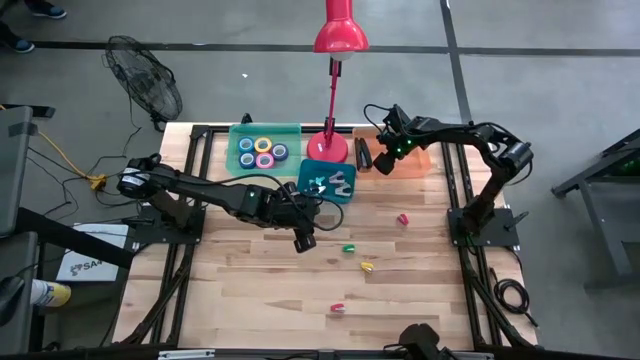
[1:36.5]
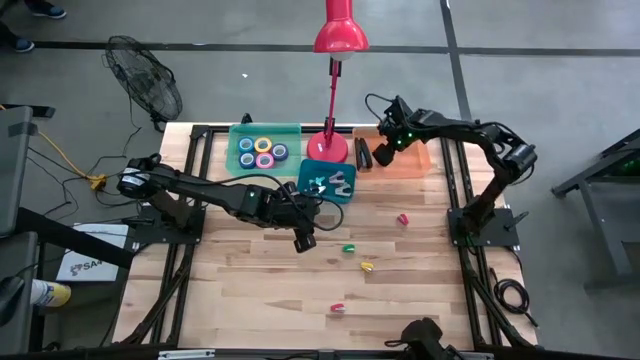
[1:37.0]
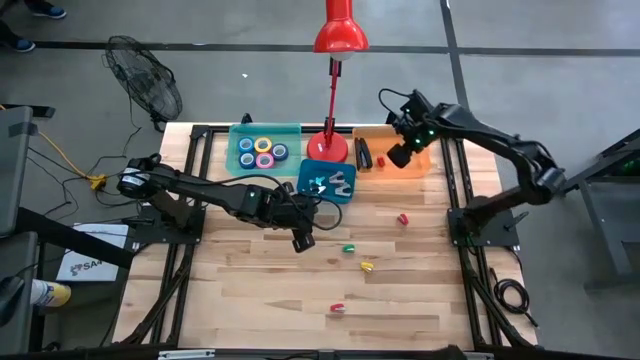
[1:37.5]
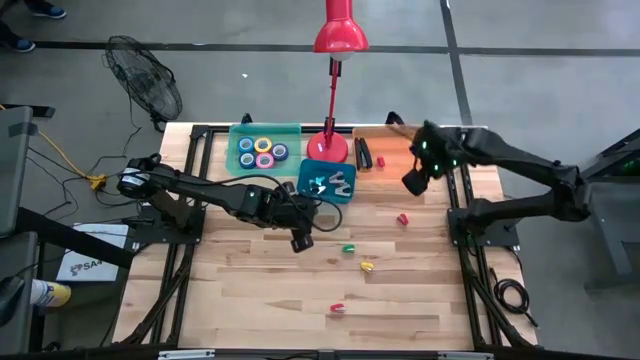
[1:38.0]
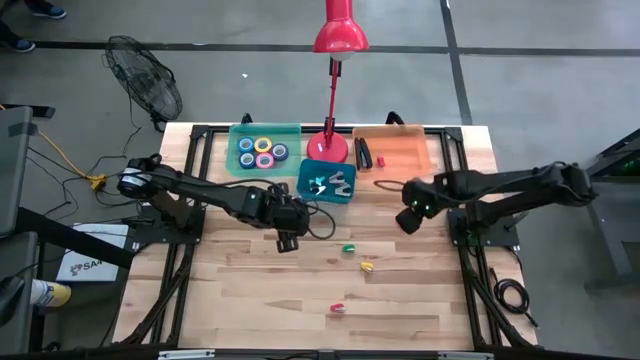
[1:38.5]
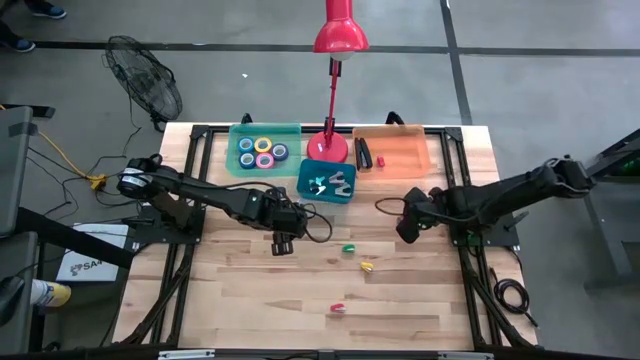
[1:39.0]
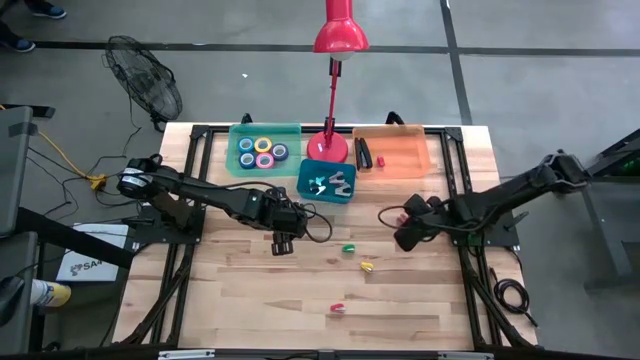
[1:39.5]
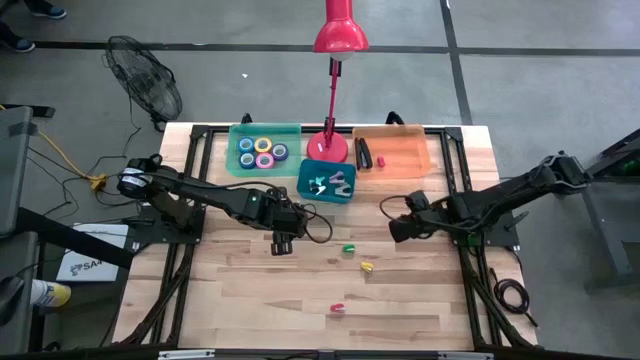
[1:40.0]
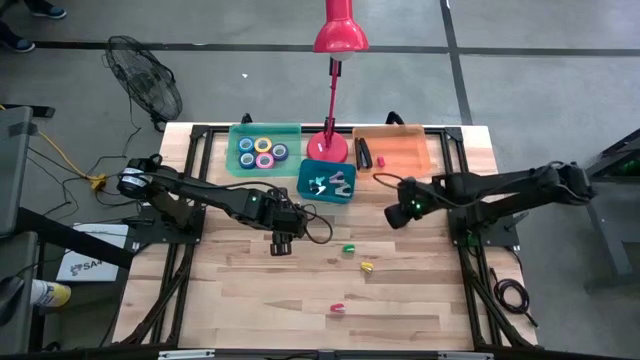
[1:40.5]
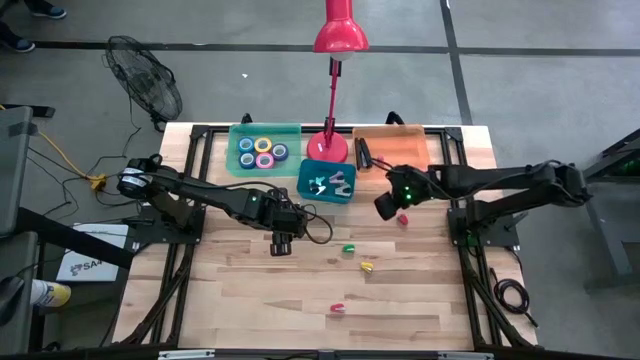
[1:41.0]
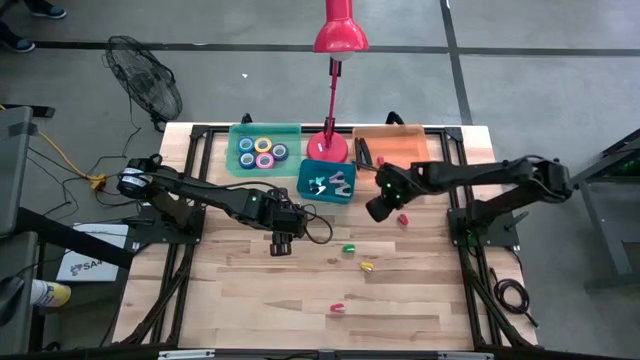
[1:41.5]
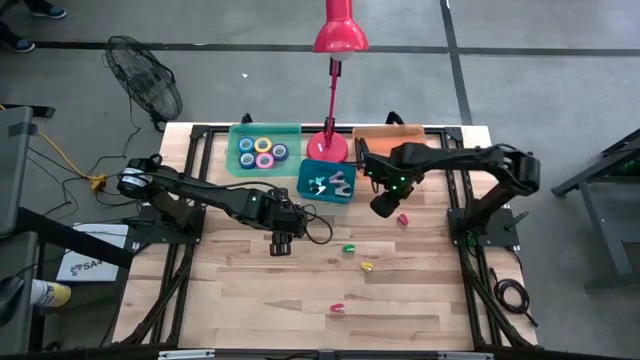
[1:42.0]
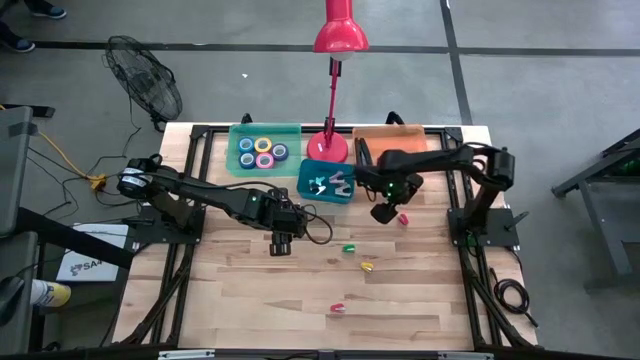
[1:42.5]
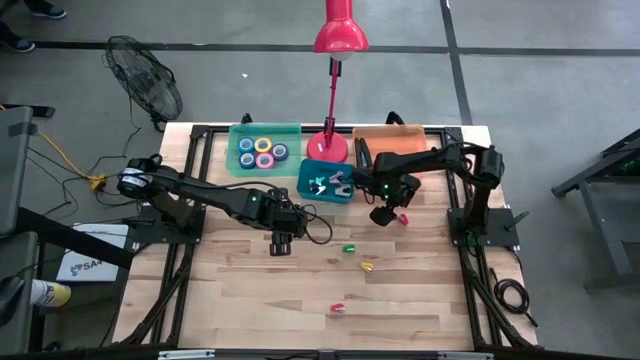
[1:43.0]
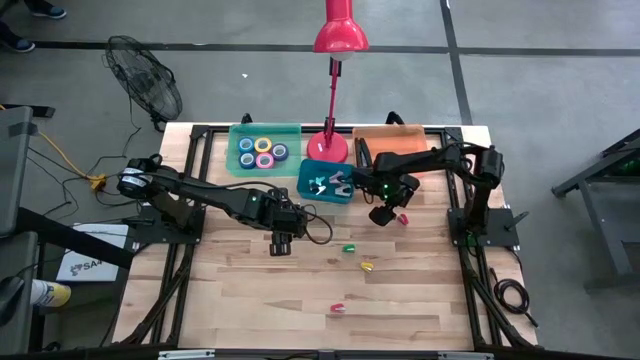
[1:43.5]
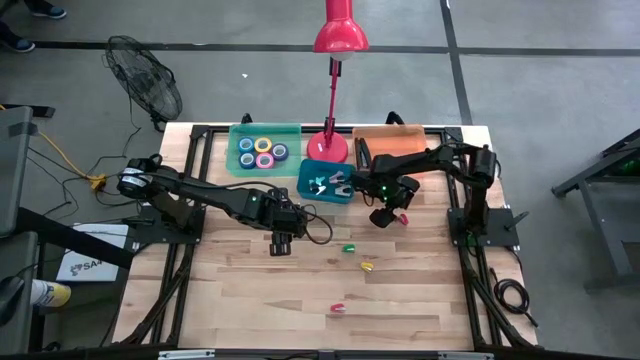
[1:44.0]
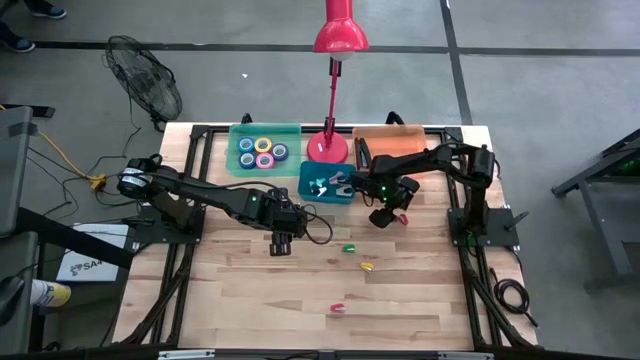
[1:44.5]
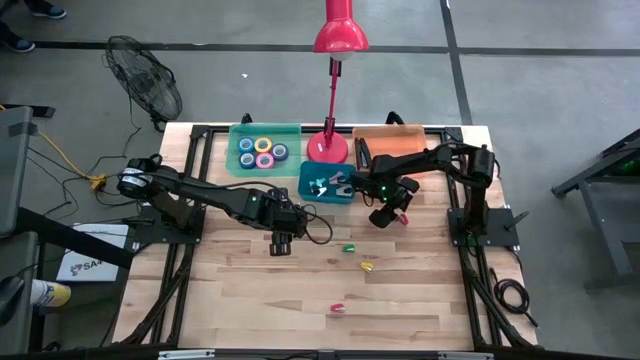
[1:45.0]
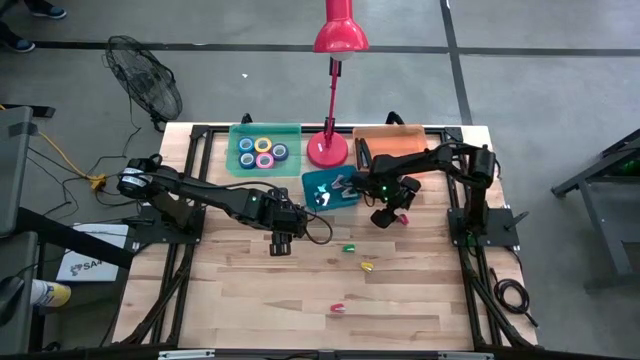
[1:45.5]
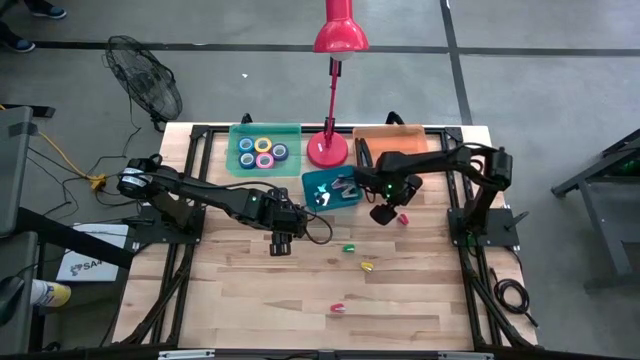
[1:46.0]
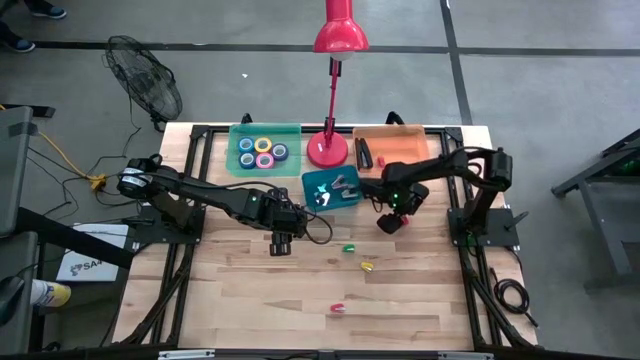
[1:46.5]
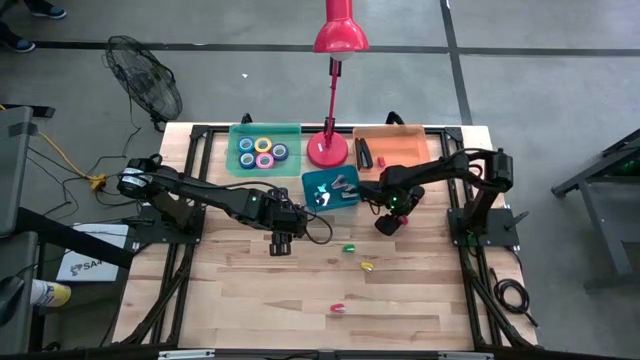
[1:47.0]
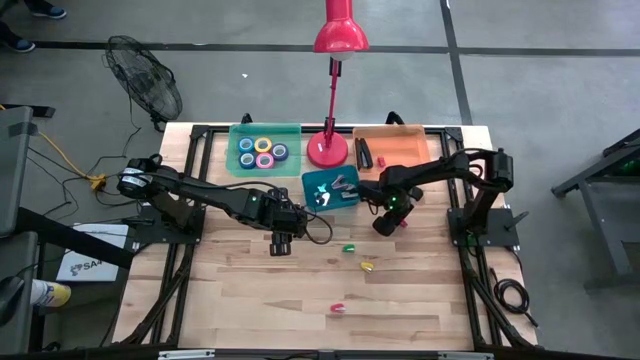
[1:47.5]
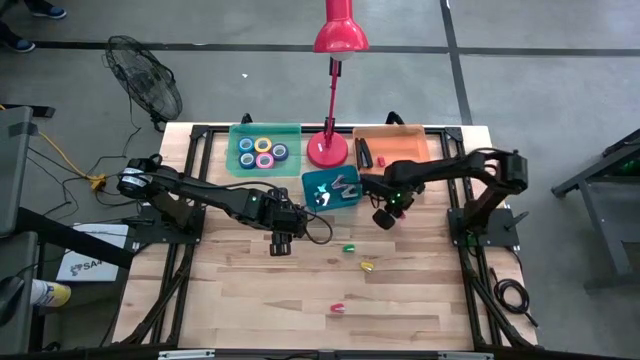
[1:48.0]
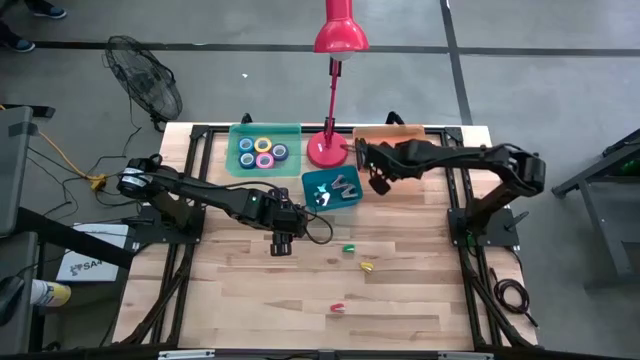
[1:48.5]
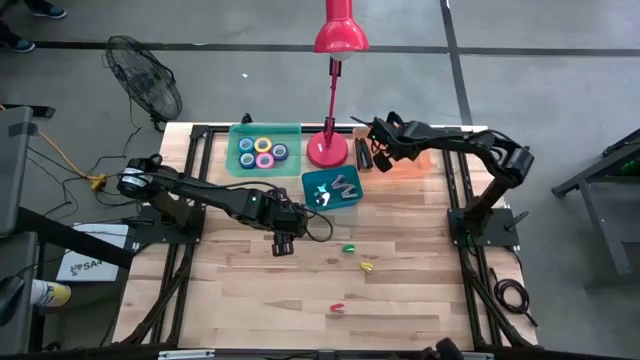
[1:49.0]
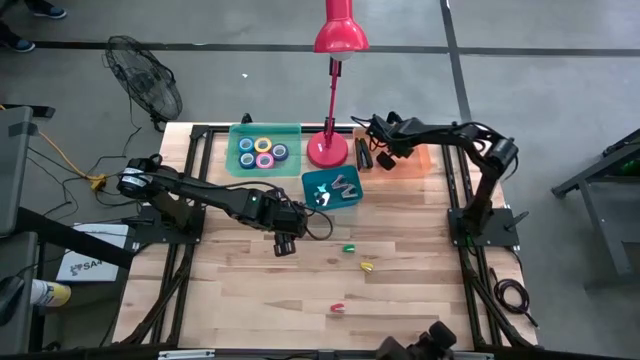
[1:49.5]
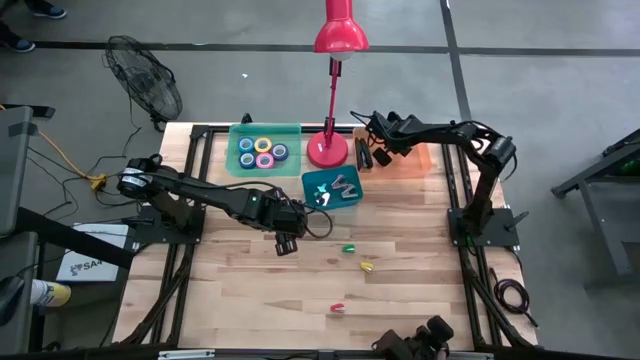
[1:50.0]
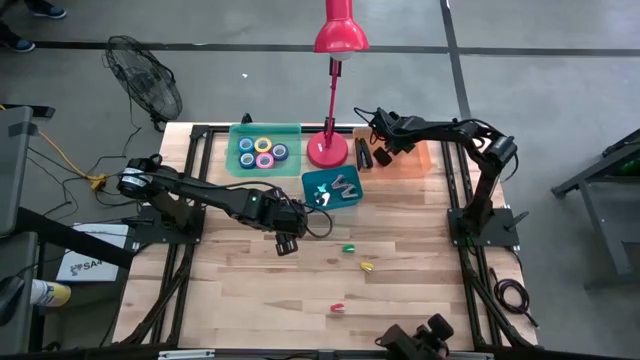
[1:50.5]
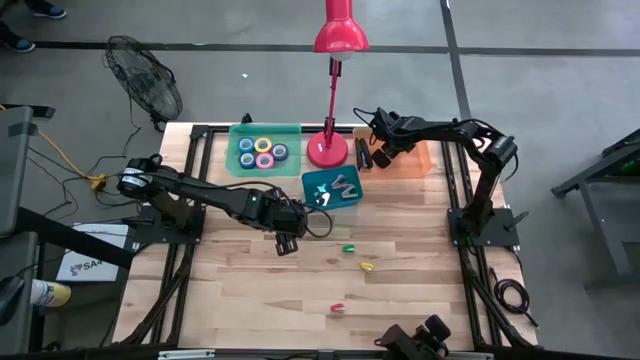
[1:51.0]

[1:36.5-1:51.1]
Task: Pick and place Stapler, Stapler remover, tape
Put the top red stapler into the orange bin

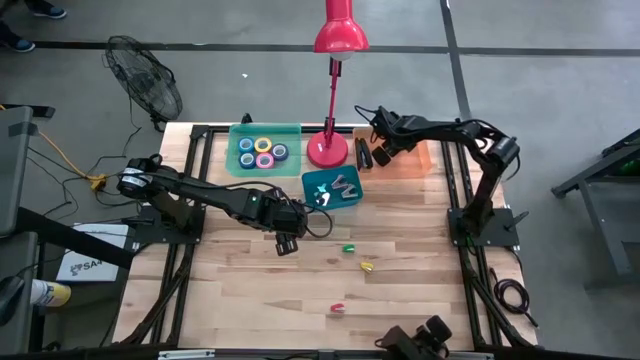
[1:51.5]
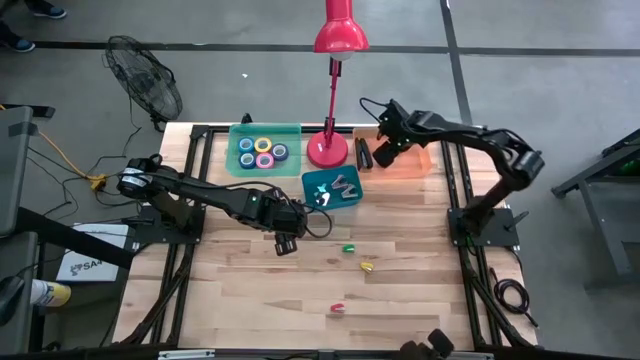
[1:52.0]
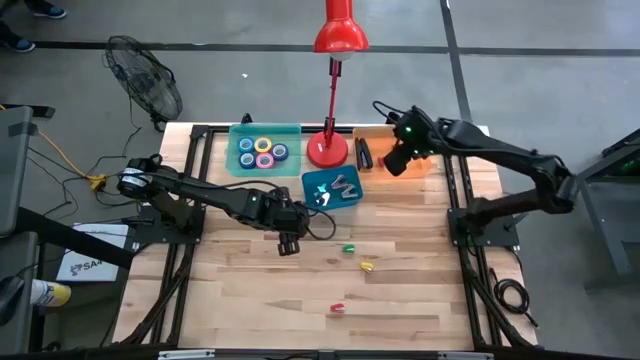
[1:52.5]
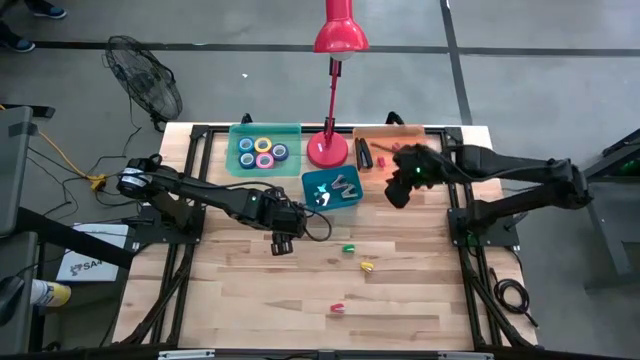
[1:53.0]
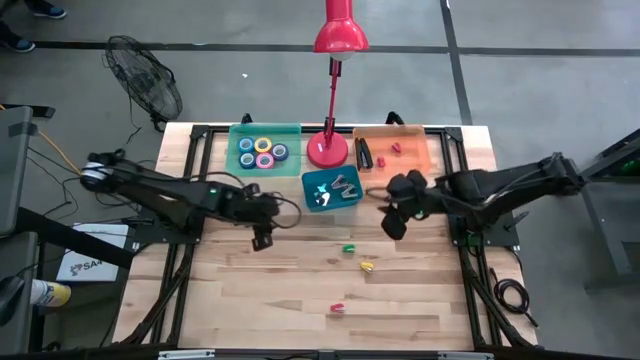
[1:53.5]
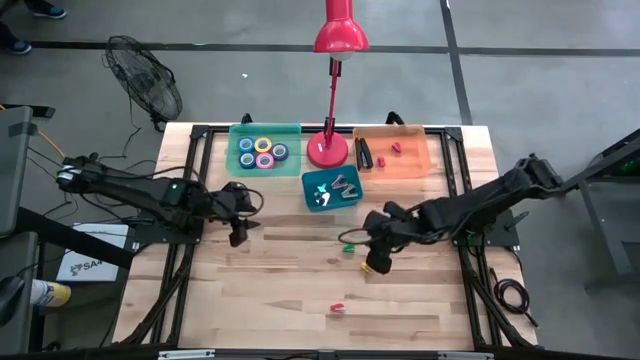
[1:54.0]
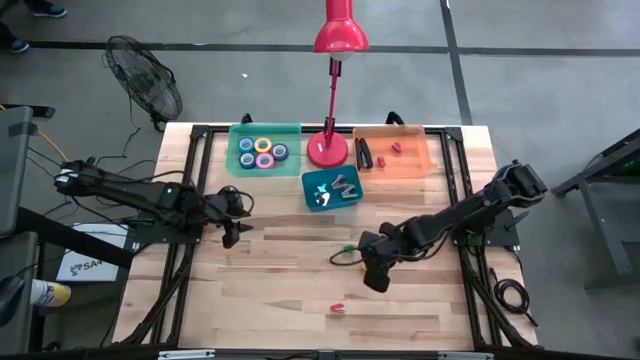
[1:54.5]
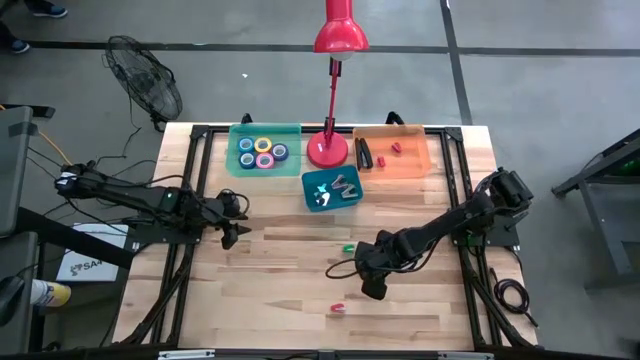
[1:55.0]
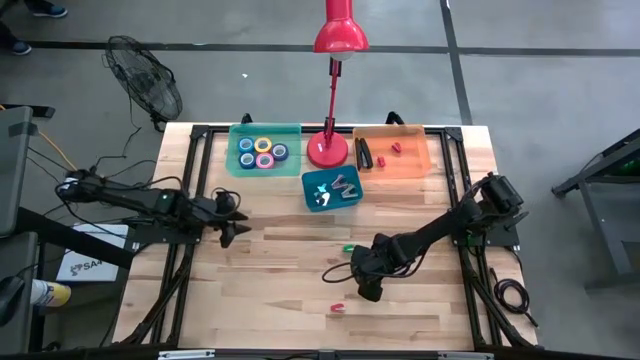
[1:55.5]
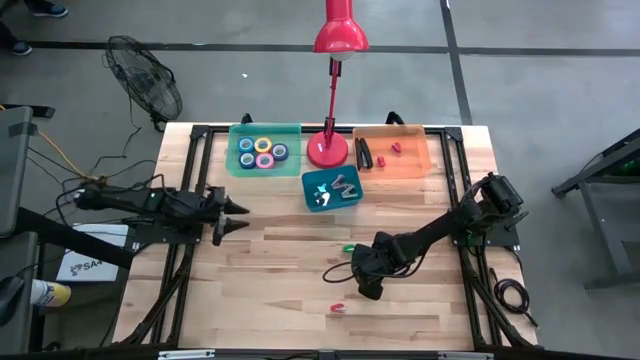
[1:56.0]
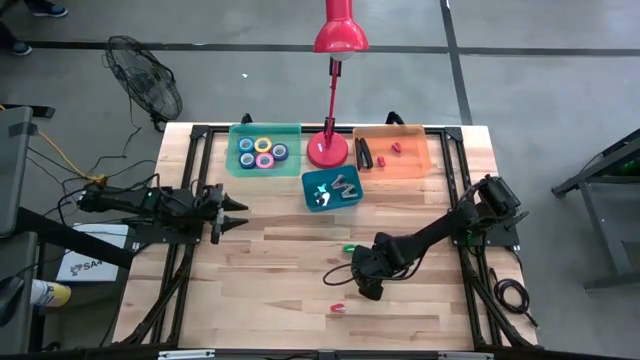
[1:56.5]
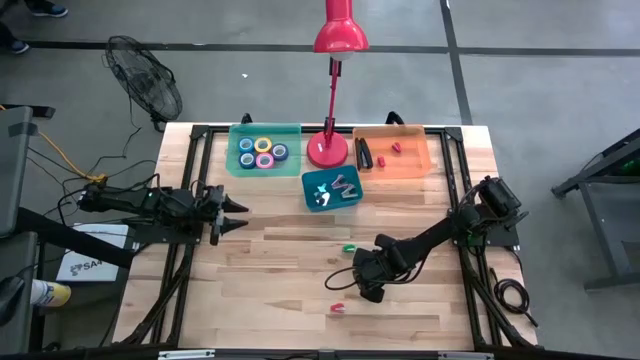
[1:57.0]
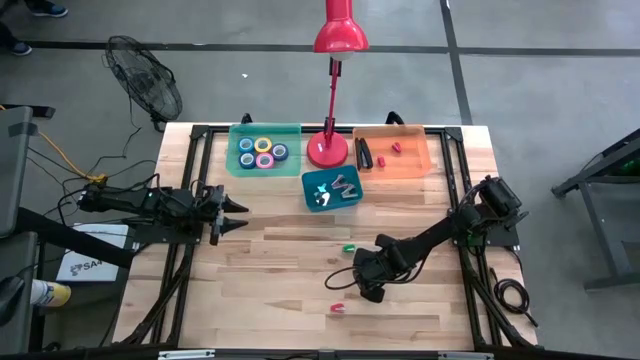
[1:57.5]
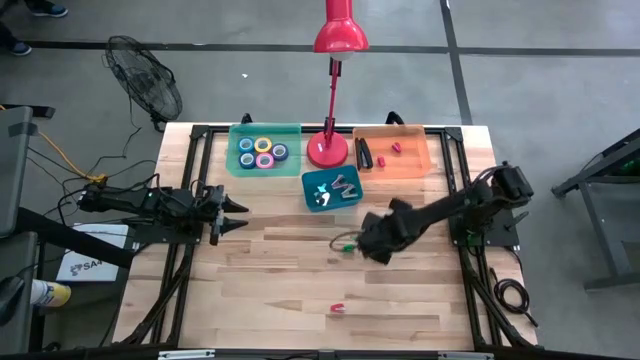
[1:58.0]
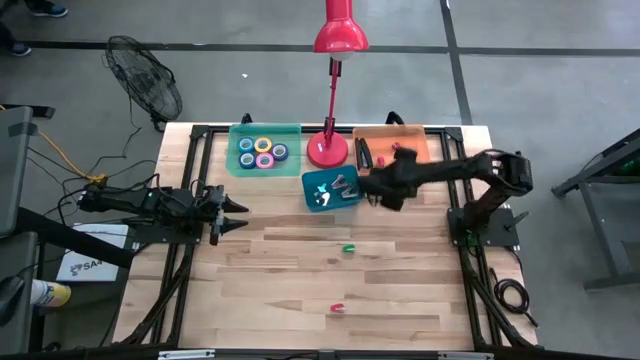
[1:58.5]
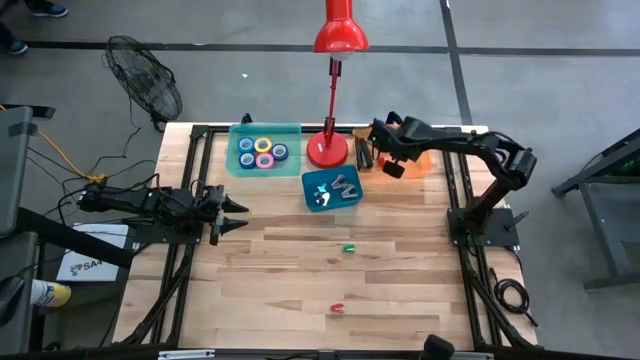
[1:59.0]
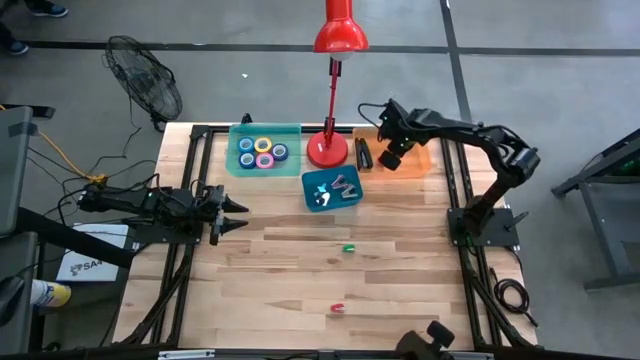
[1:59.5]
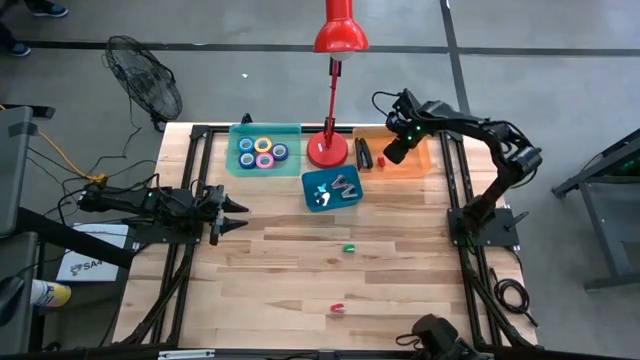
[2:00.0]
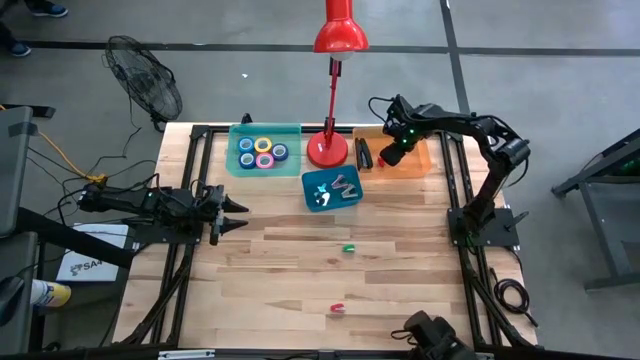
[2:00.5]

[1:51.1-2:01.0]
Put the yellow stapler into the orange bin
